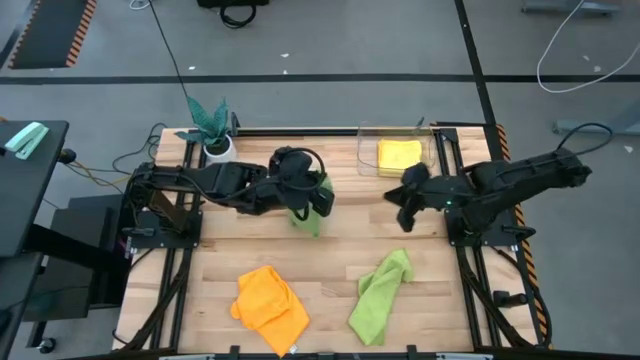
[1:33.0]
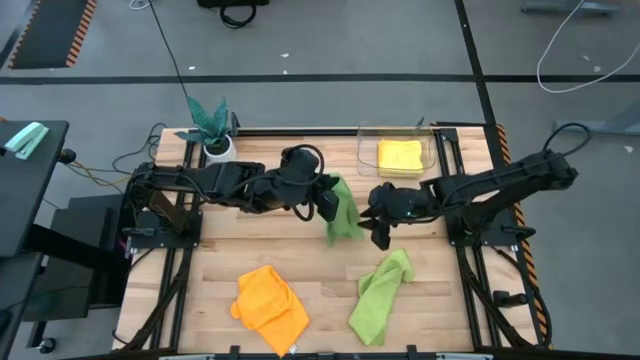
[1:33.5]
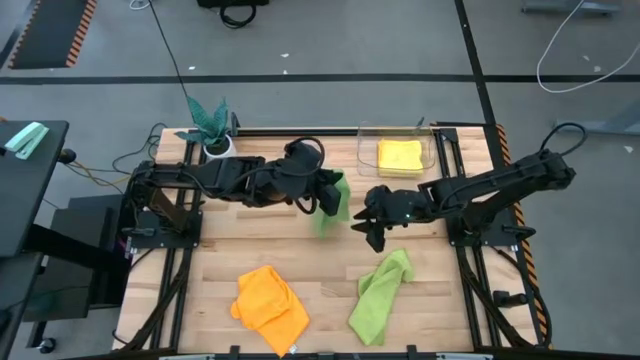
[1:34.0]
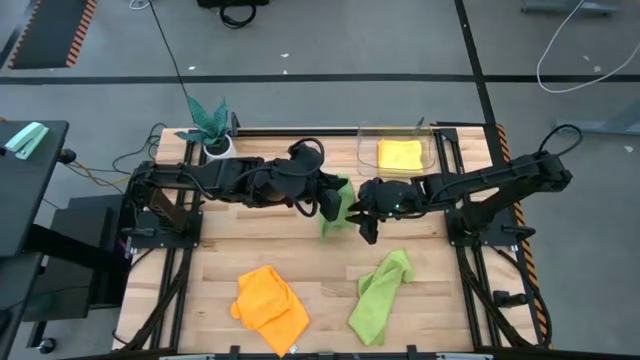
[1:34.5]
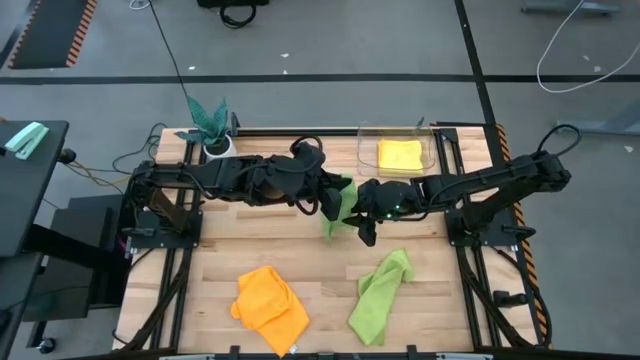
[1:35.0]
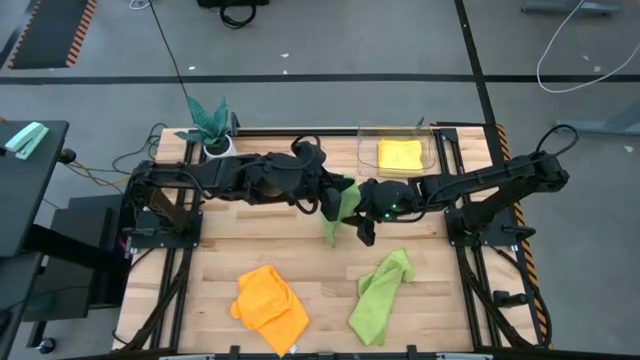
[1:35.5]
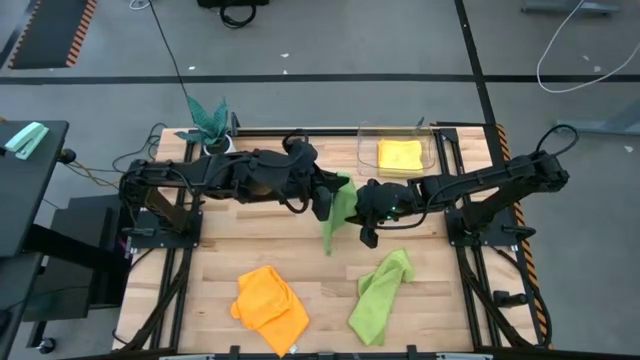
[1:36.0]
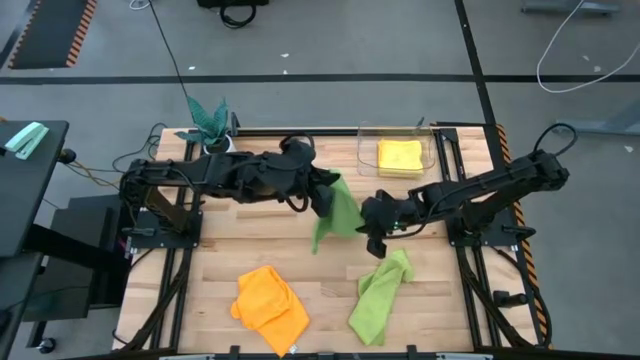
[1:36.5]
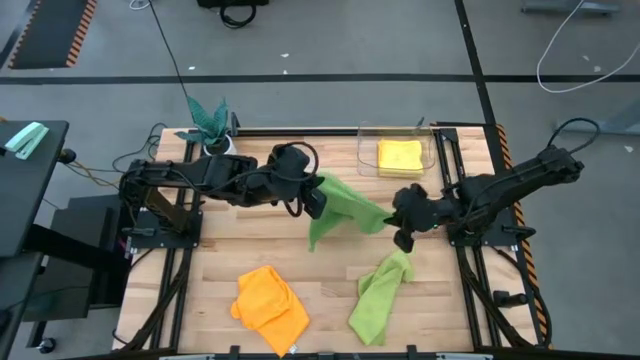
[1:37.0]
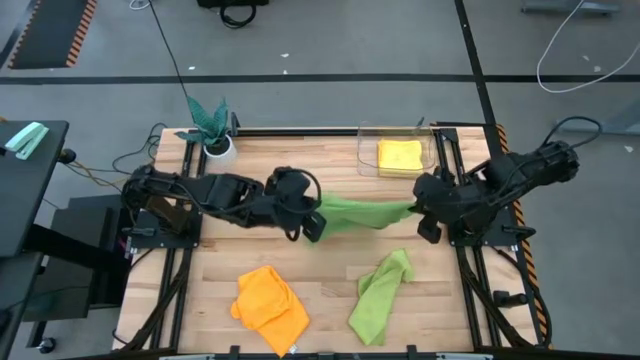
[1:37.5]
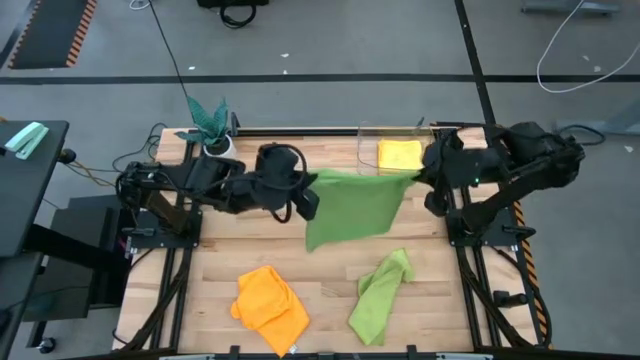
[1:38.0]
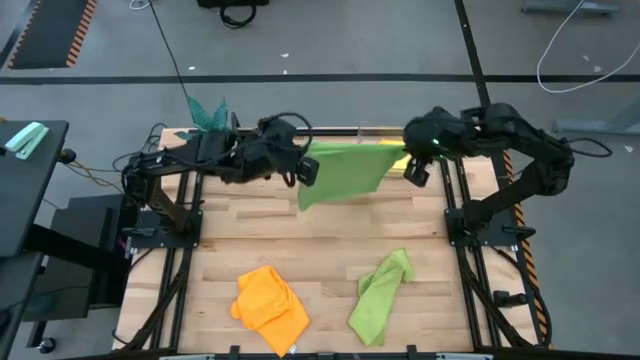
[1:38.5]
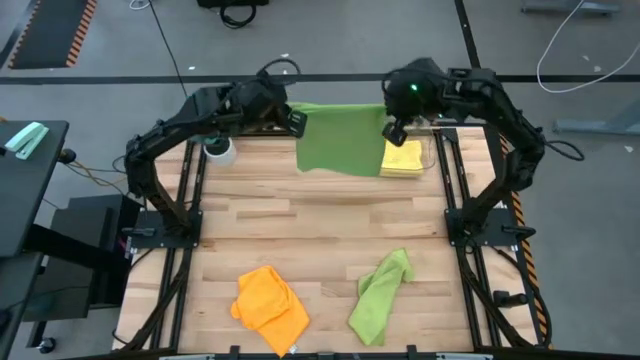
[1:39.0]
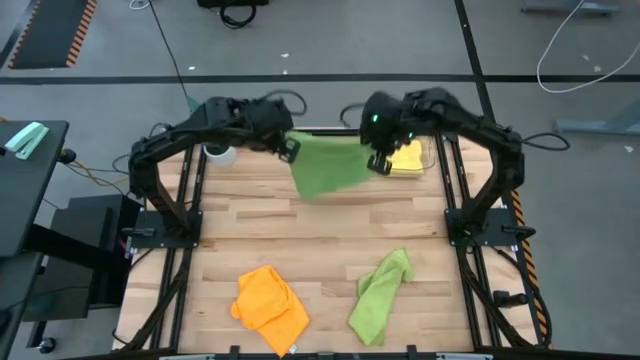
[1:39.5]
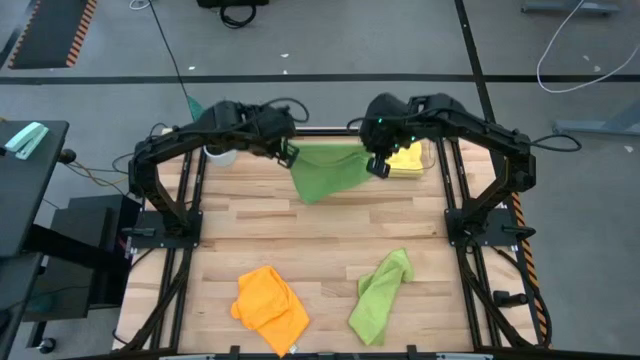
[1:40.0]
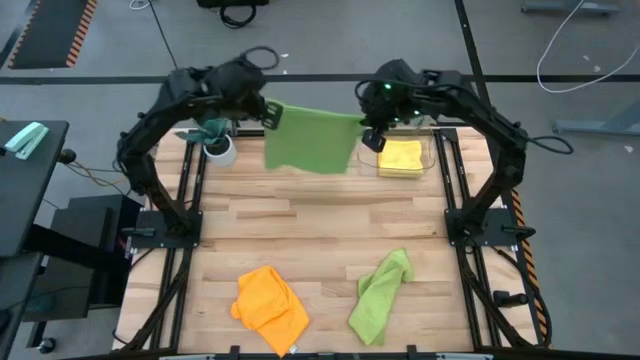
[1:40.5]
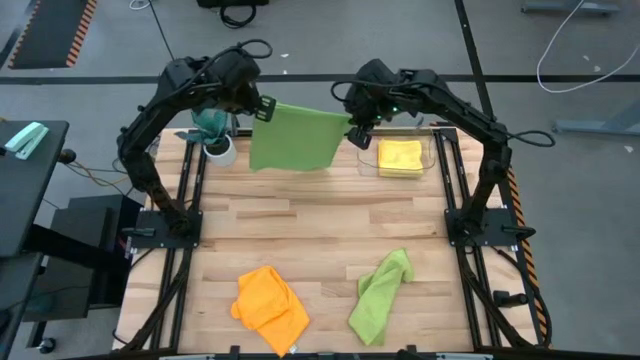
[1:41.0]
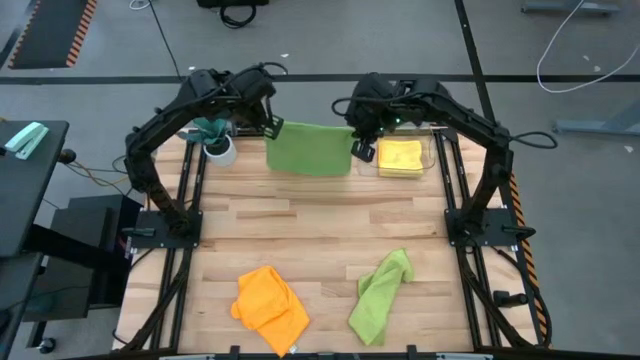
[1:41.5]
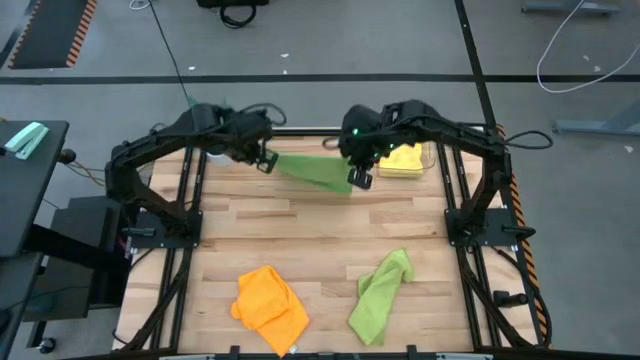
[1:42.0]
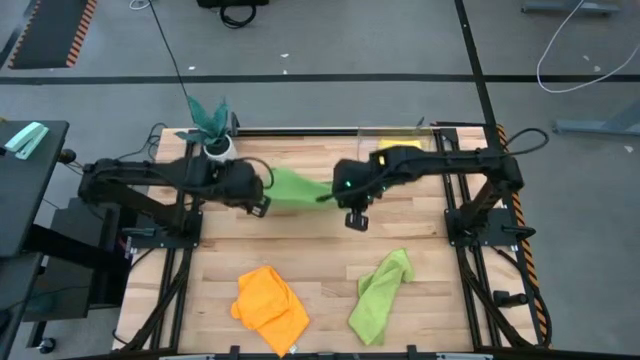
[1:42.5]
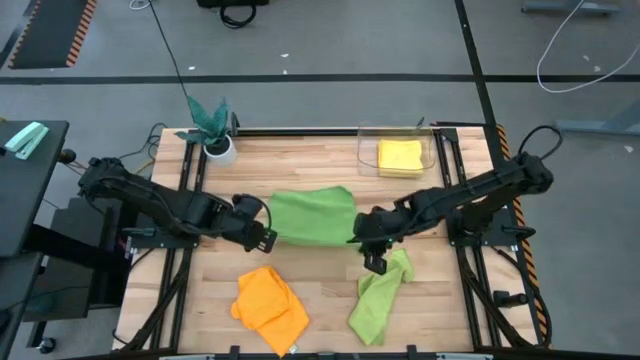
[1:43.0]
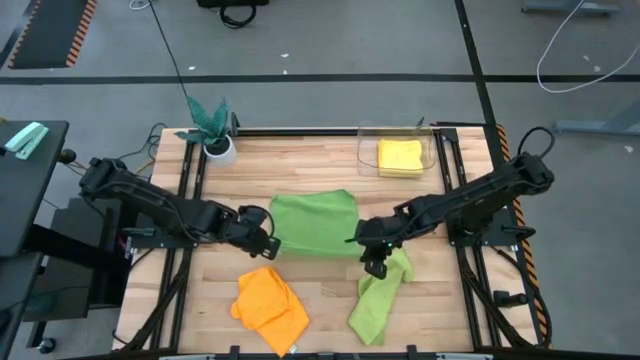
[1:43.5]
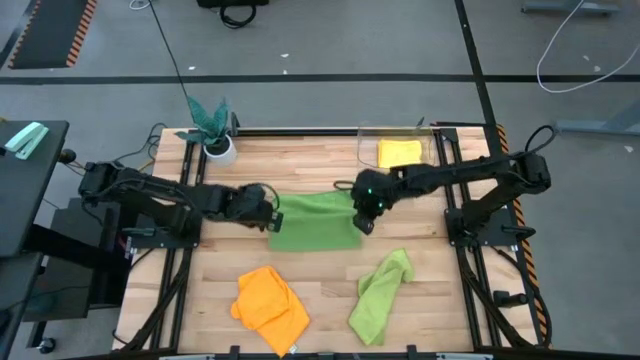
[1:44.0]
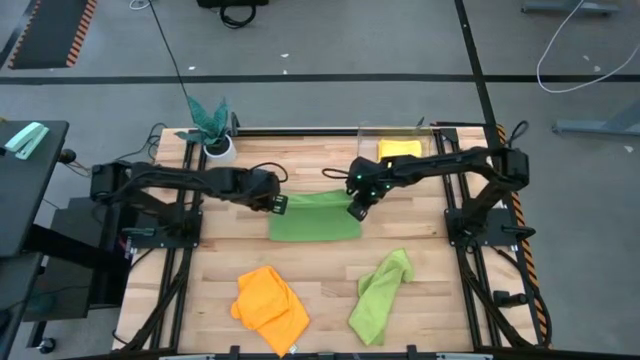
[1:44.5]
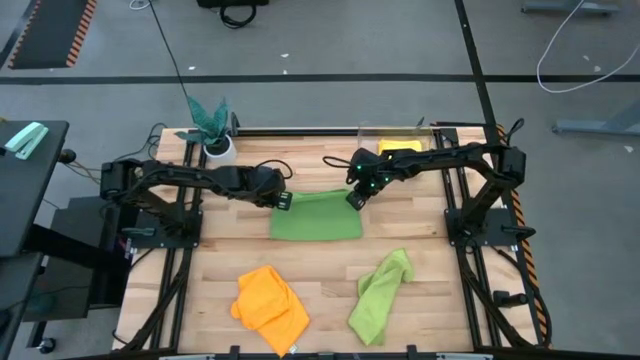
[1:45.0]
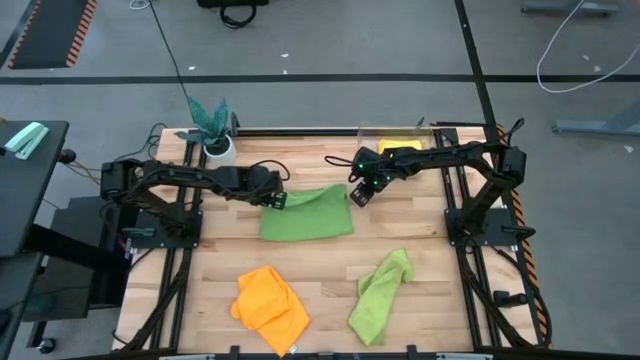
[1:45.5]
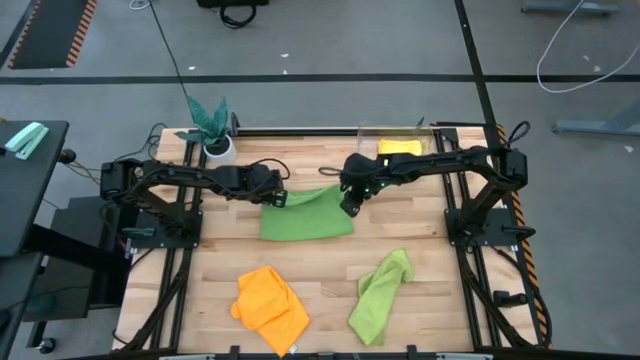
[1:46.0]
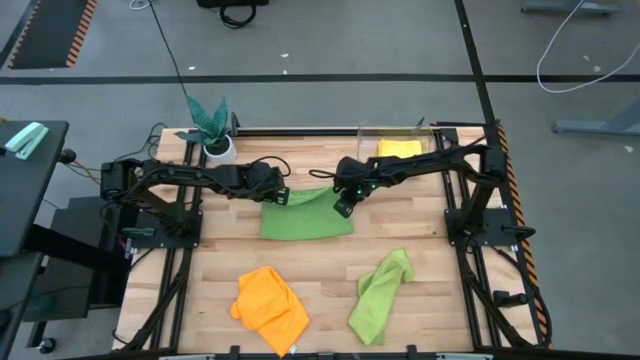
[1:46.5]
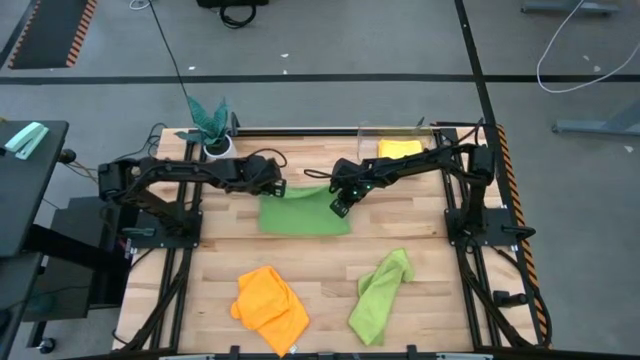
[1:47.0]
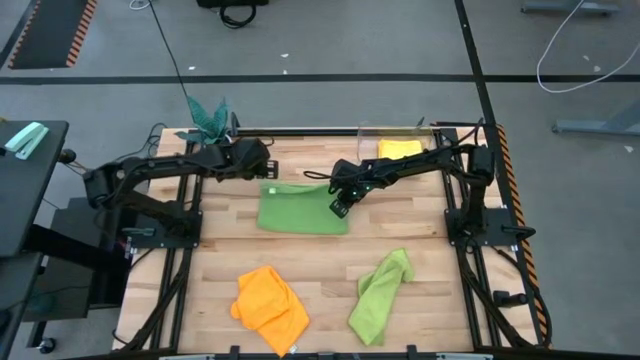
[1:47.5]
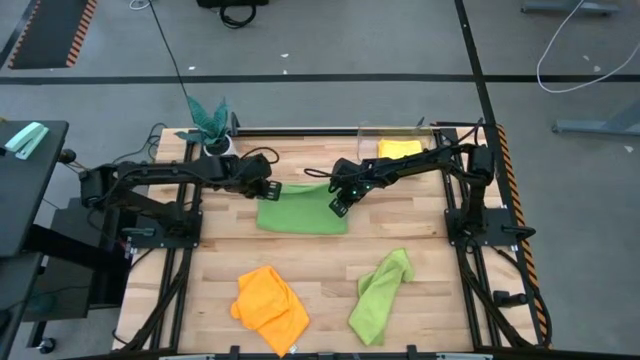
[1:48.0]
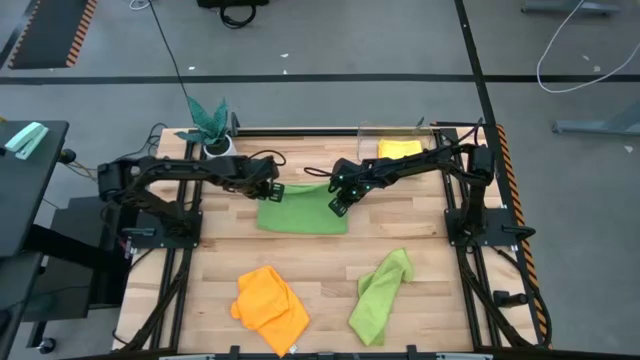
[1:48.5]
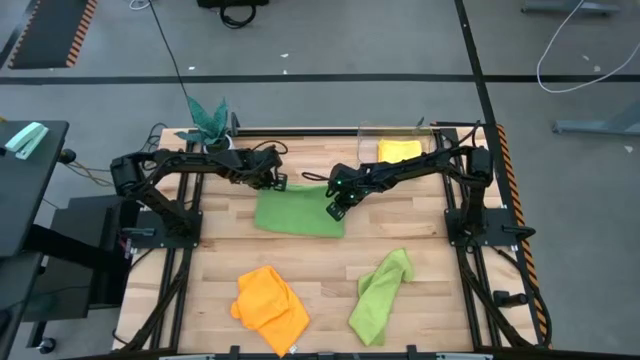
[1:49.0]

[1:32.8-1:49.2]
Task: Fold microfiber towels
Fold the green towel

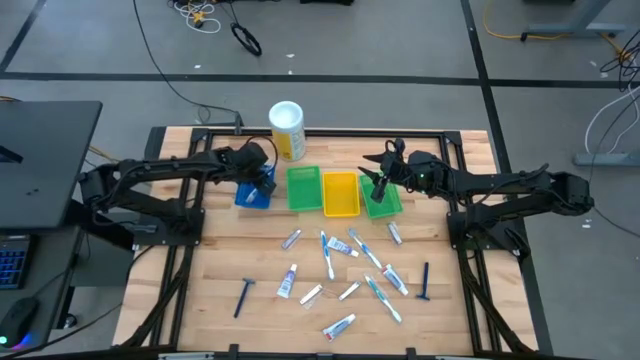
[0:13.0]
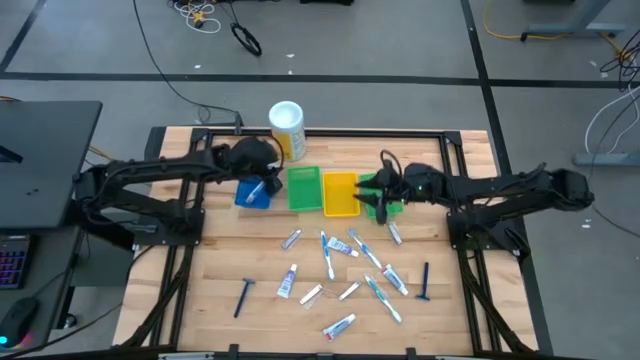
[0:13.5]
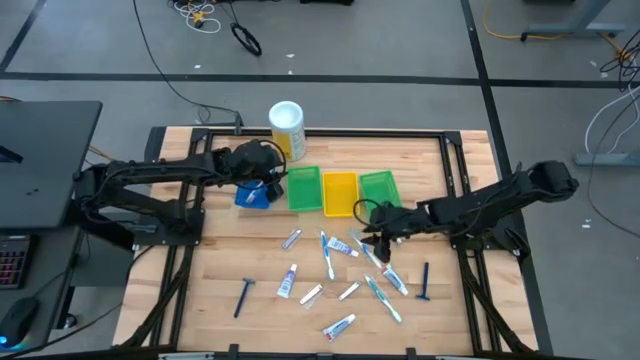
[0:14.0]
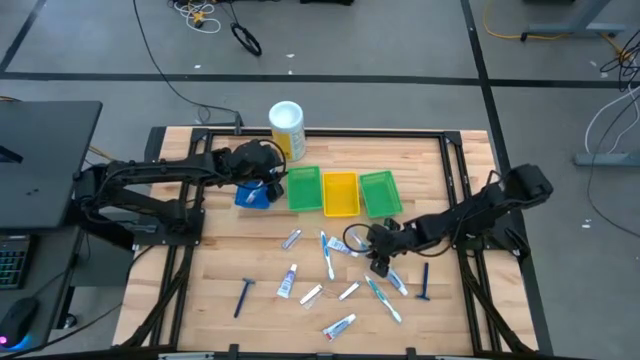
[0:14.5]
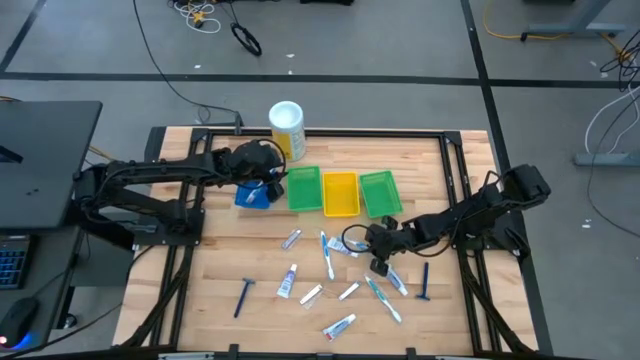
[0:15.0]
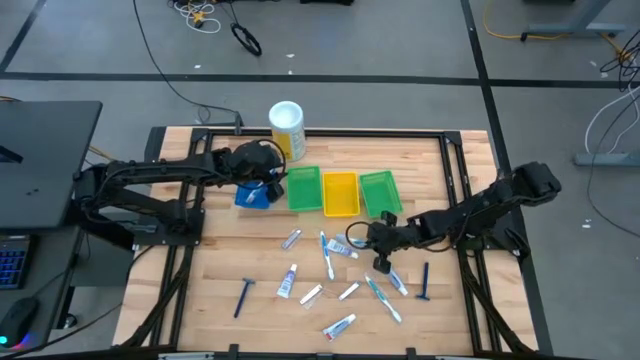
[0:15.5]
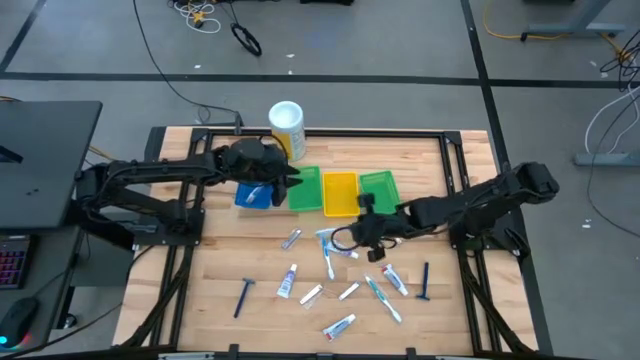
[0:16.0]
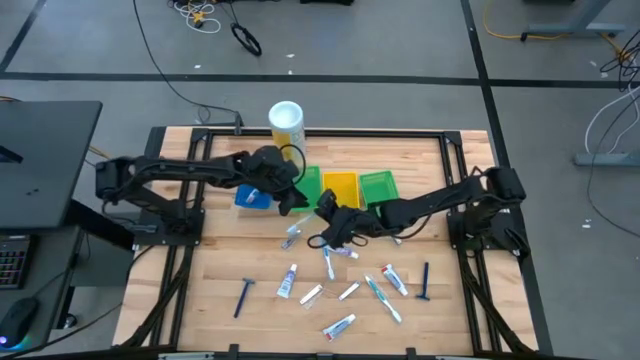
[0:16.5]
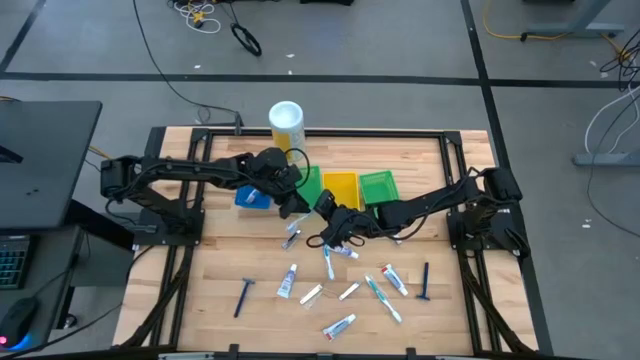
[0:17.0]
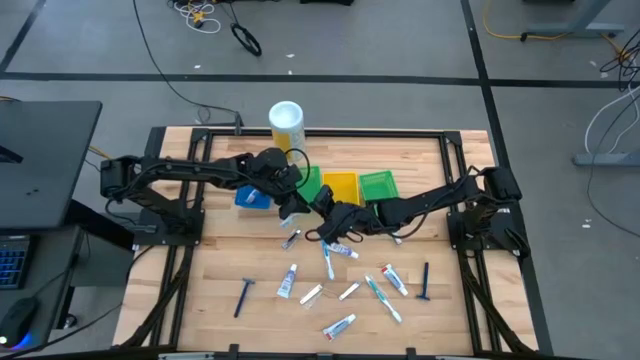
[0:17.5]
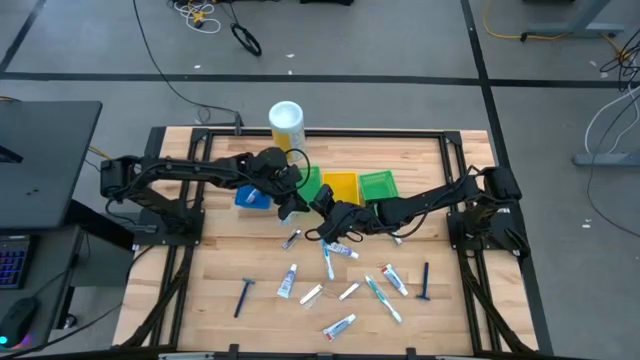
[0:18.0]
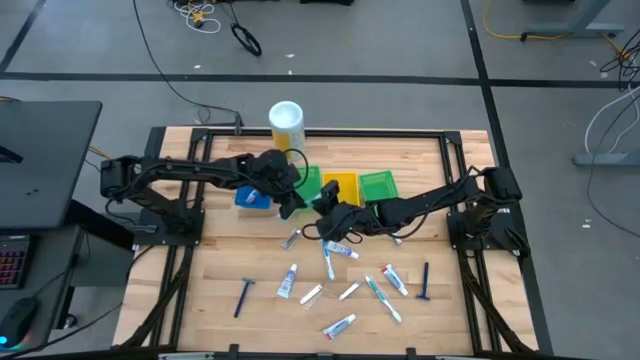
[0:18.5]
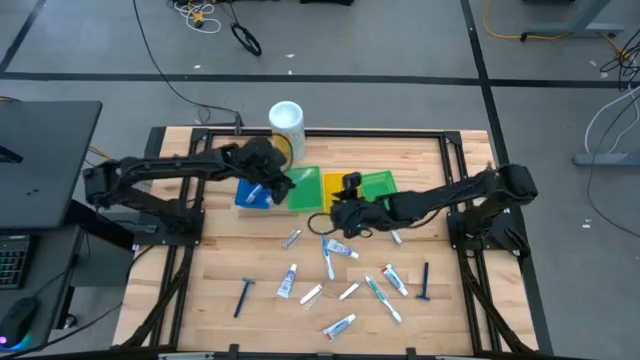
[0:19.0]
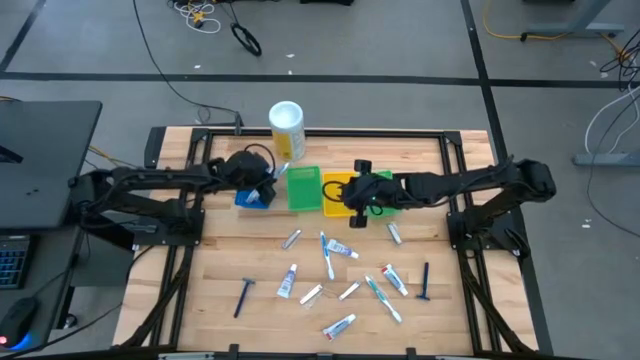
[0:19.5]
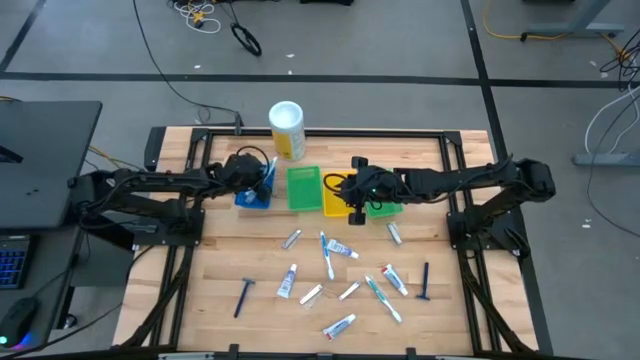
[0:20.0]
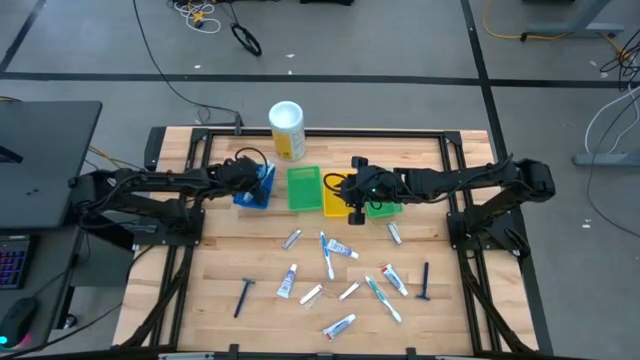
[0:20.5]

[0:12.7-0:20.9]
Task: Pick & Place Travel size toiletries
Put the blue toothbrush into the blue bin
